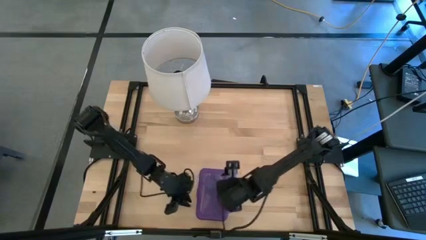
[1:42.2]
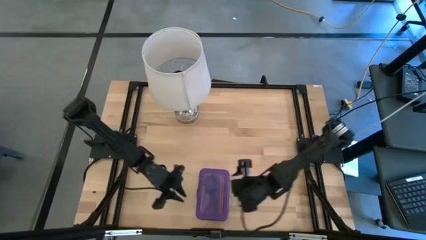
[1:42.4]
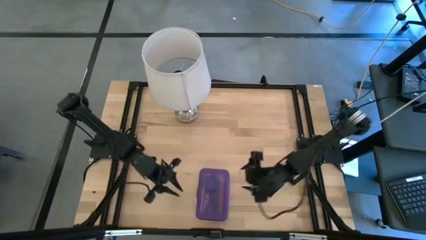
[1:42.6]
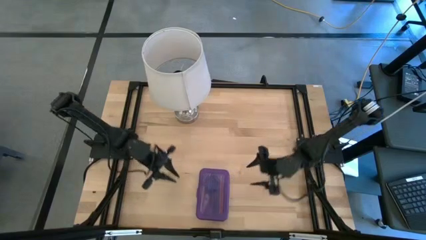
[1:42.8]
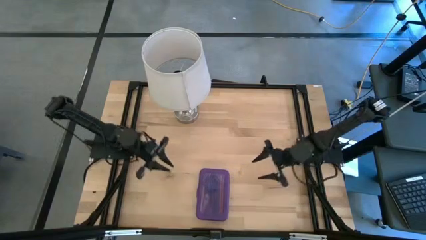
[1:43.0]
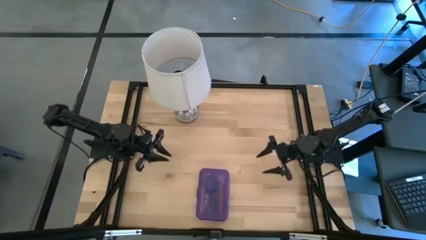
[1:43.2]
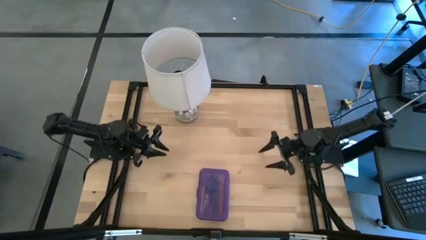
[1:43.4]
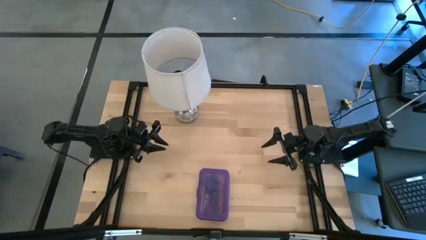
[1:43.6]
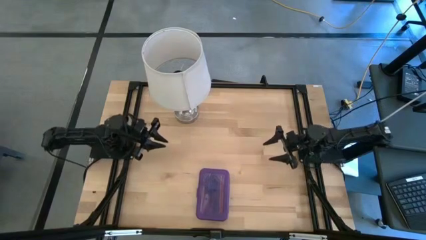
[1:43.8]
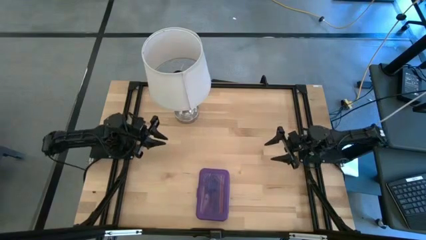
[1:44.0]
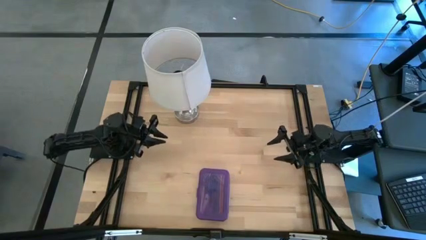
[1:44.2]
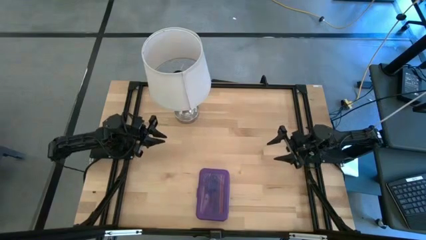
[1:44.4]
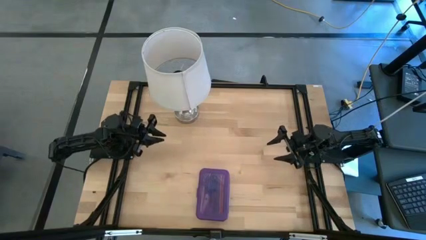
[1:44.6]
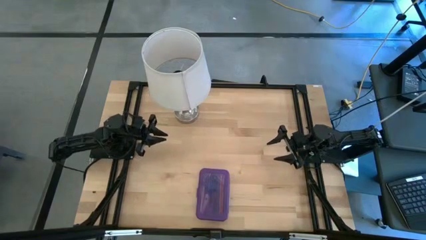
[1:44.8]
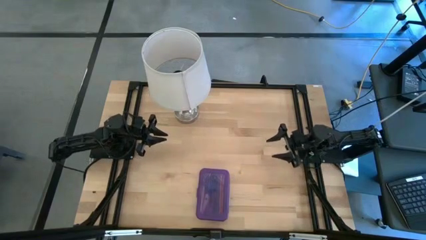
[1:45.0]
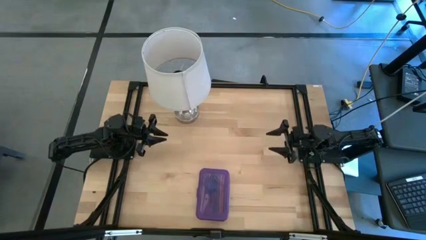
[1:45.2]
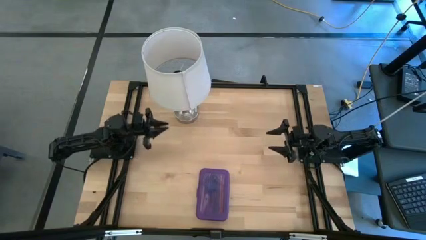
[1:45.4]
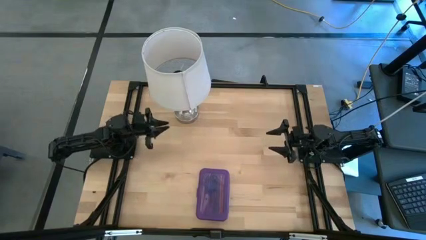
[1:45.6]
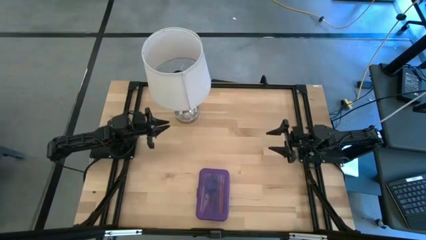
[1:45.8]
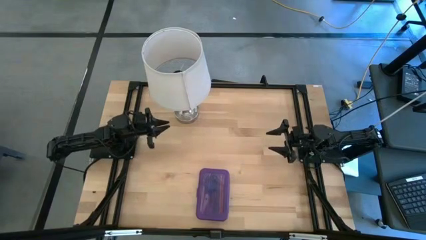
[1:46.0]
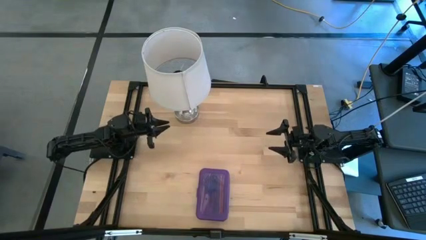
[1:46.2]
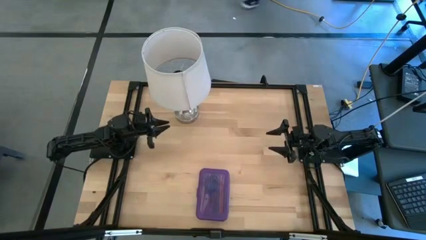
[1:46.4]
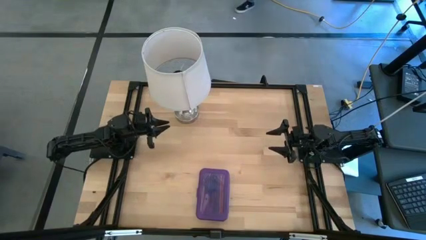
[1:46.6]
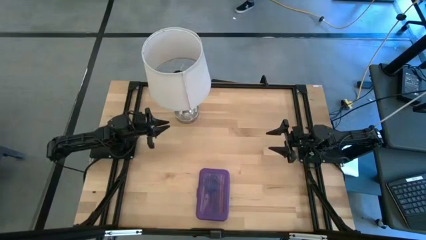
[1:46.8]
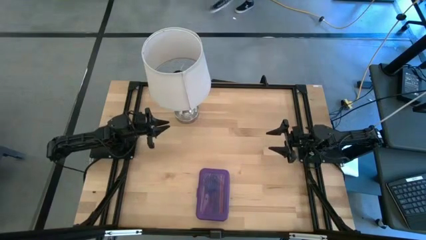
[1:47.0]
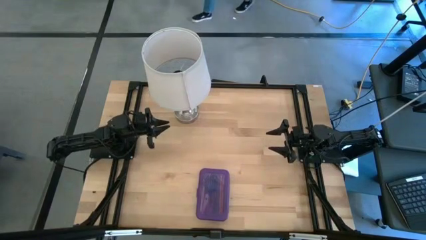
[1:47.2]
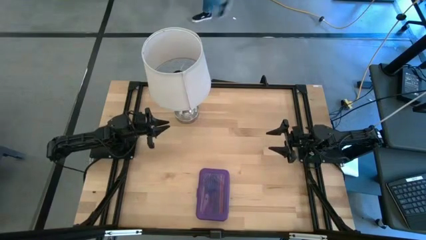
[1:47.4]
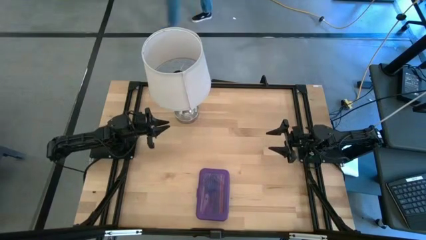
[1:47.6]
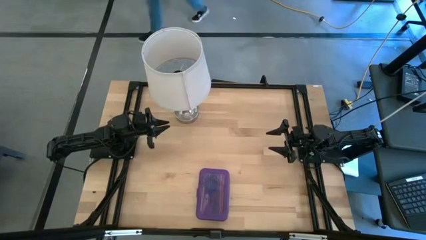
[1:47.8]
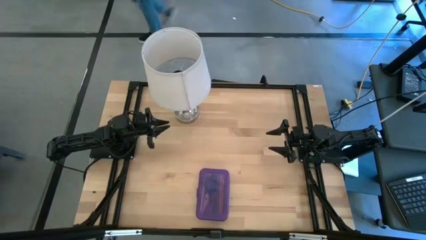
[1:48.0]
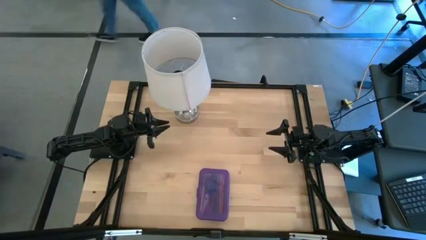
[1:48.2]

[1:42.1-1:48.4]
Task: Pick & place school supplies into a supply box
Return to Home Position

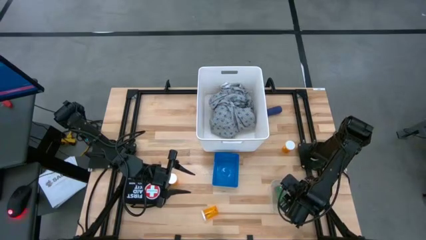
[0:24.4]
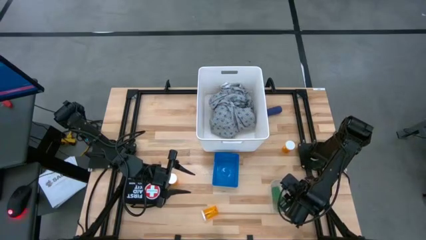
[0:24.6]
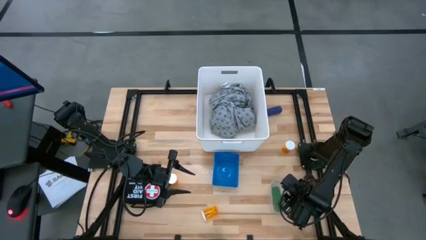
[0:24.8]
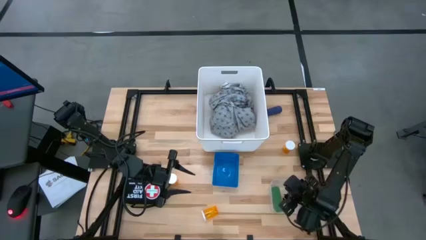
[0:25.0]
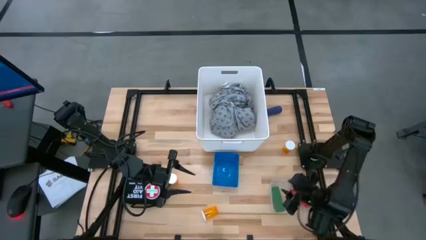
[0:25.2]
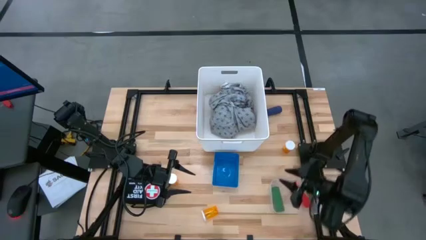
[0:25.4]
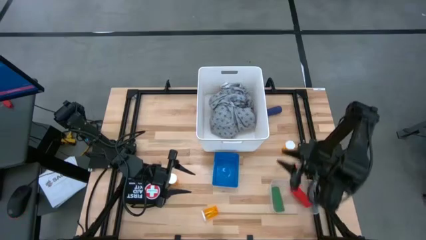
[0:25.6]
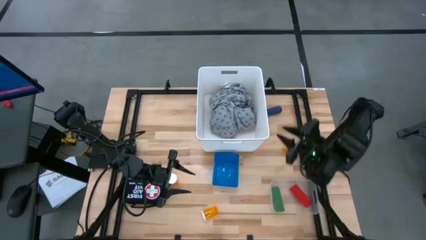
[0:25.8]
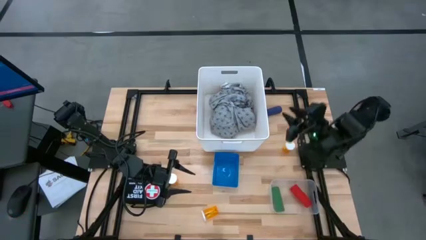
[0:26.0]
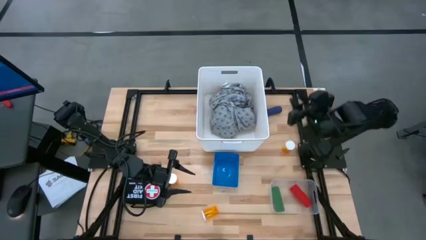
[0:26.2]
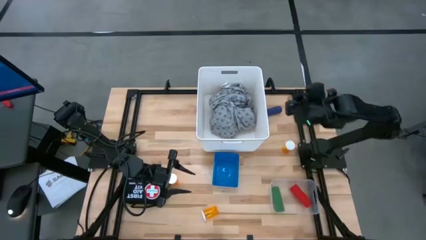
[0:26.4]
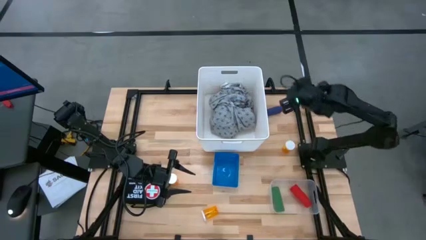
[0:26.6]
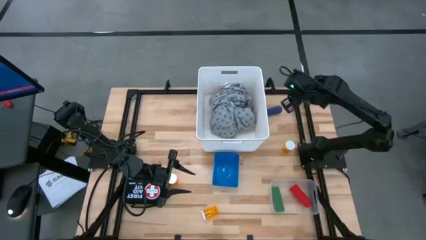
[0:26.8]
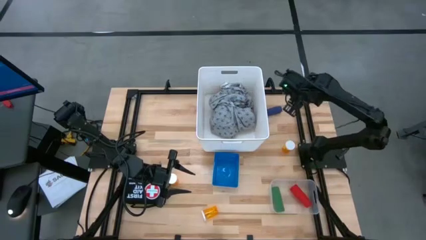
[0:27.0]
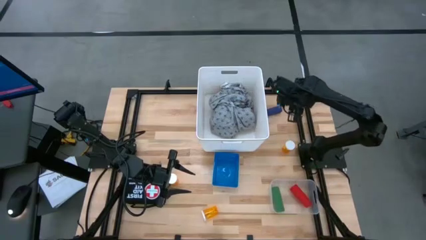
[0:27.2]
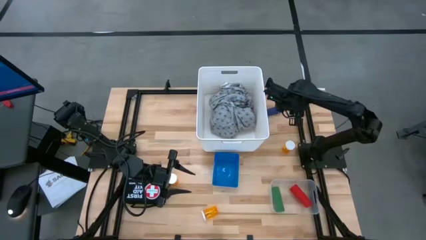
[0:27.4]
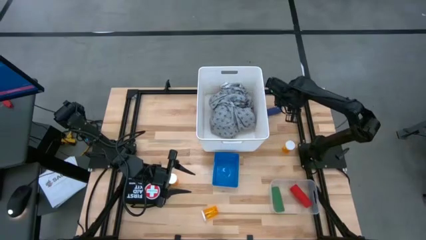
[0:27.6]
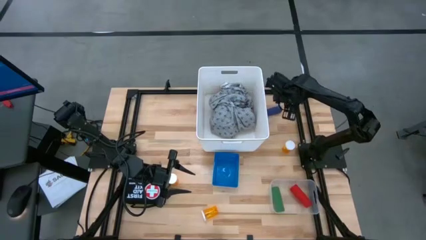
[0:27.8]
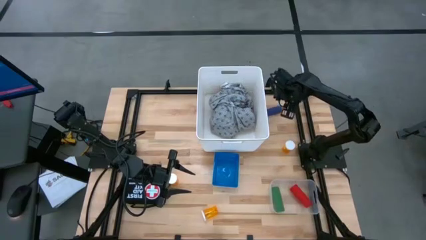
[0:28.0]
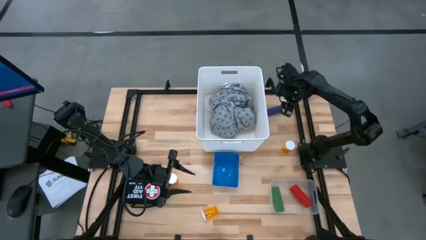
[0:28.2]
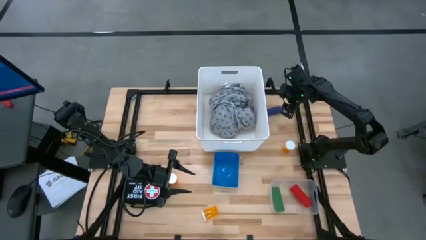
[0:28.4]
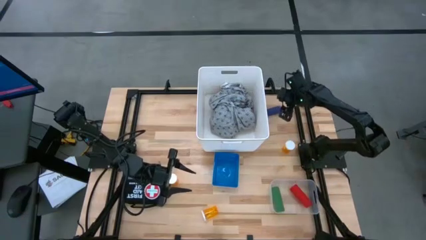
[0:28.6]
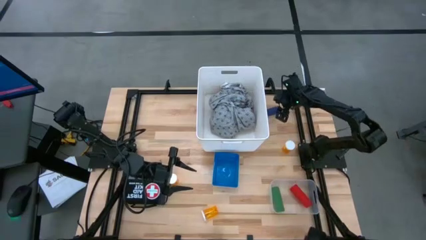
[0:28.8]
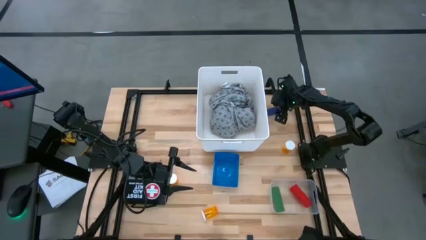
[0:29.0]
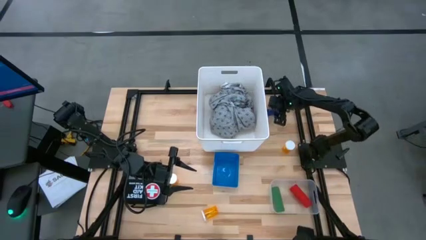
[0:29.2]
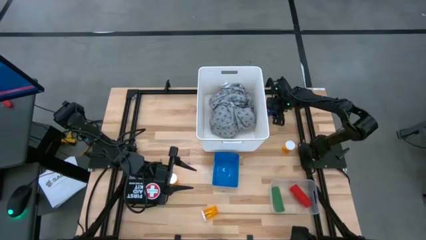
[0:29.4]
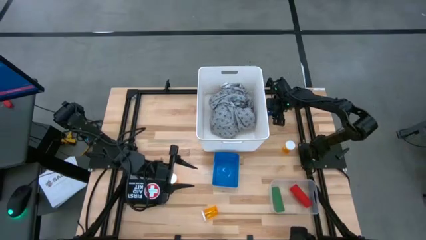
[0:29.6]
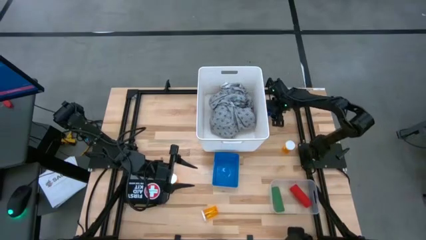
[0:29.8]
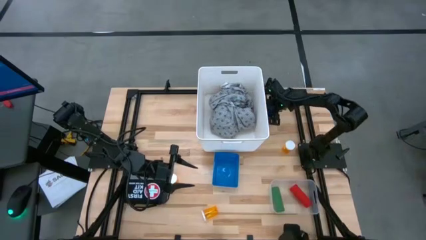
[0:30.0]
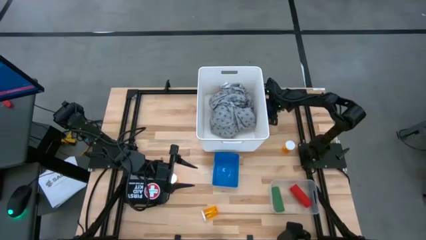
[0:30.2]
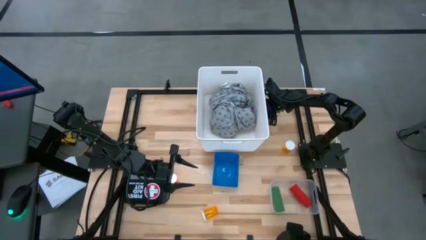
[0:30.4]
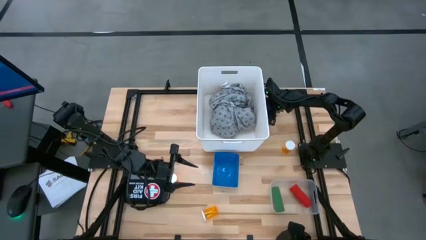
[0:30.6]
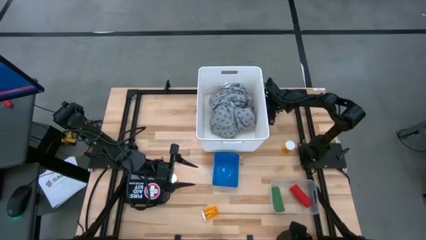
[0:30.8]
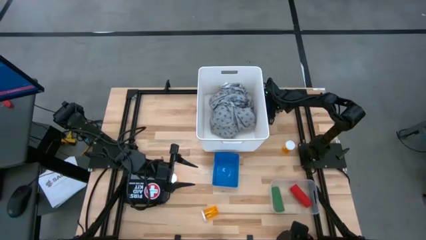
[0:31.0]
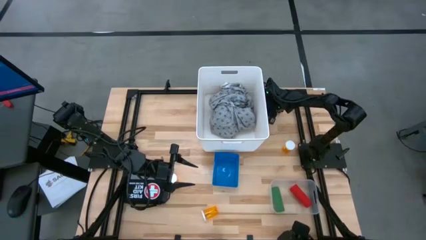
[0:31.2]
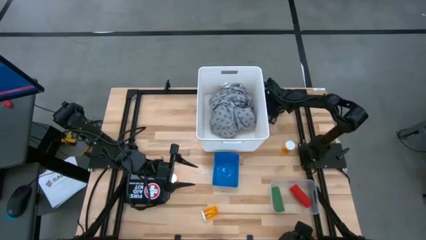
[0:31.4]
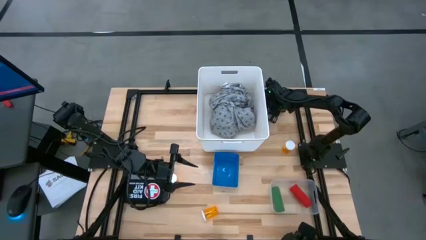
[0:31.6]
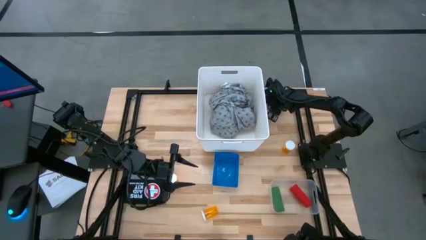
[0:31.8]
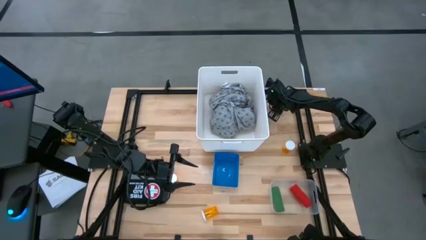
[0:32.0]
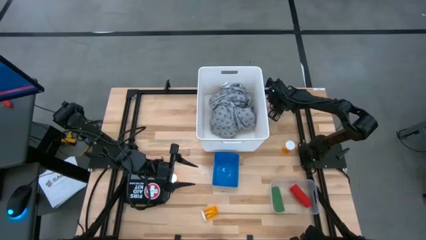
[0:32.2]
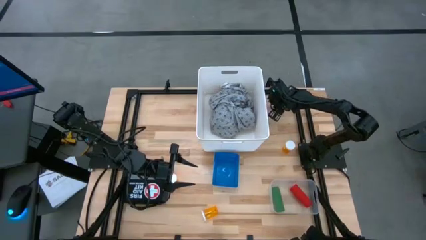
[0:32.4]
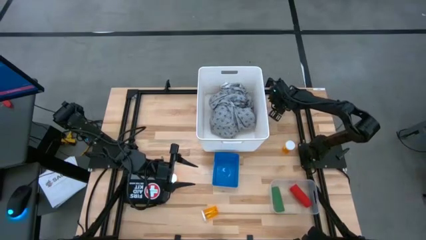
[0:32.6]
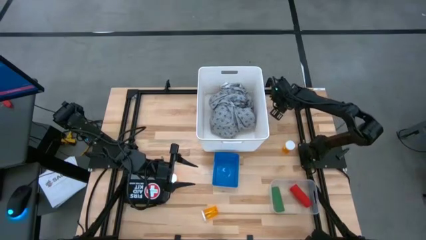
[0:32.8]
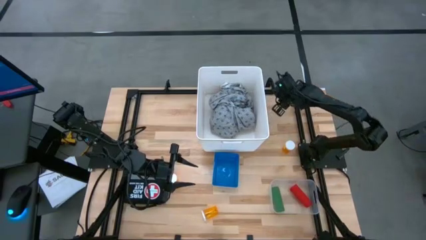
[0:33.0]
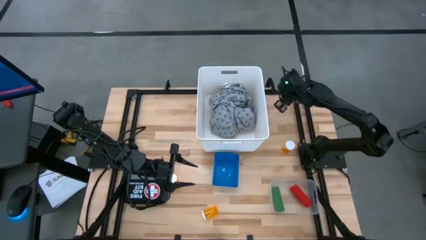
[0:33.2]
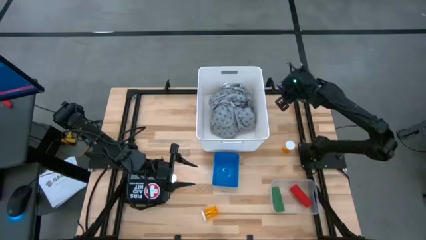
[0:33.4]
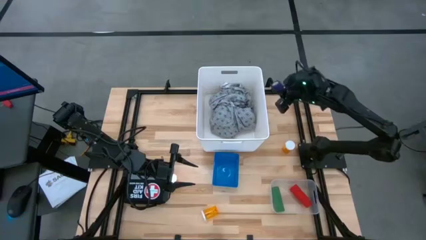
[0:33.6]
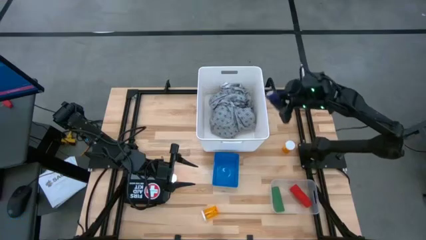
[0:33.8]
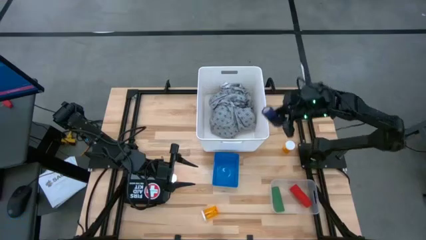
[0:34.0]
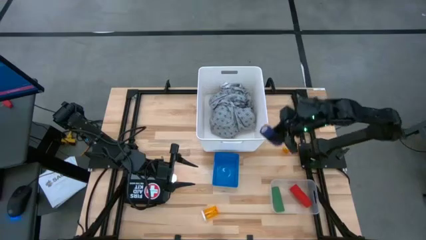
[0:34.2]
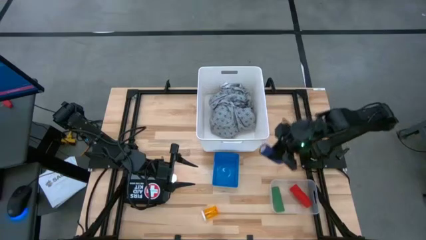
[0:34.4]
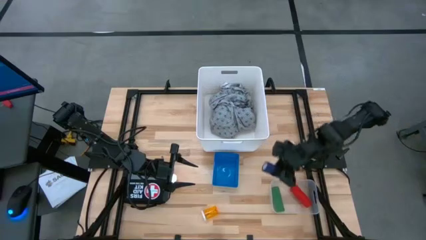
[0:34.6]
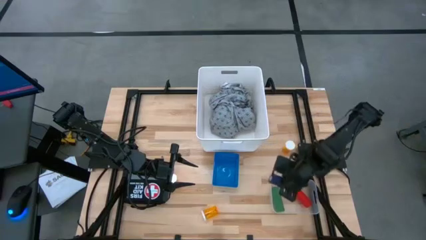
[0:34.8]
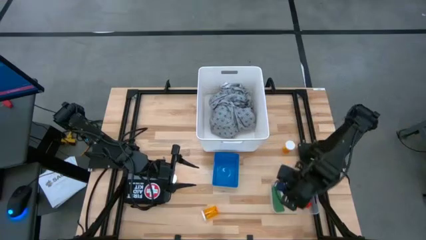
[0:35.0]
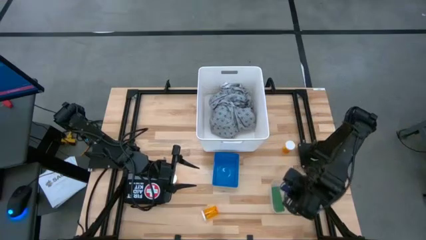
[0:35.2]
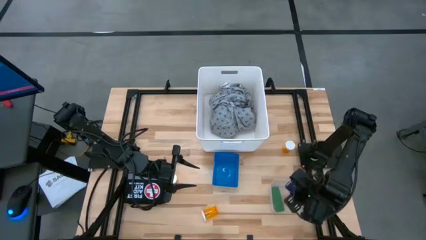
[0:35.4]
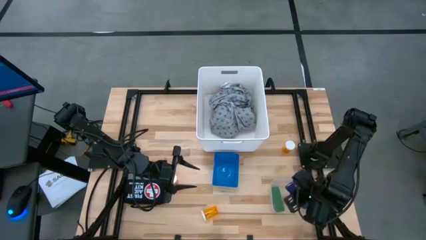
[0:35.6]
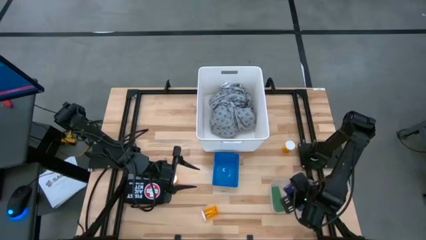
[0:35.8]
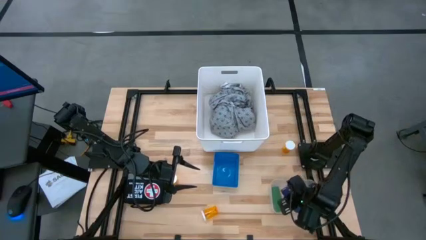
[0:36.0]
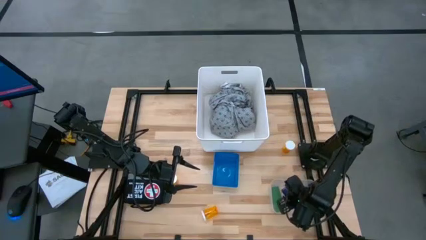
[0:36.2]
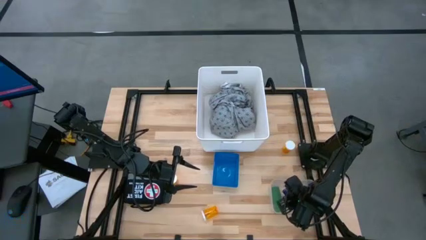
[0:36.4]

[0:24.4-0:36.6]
Task: Pick & place medical supplies in basket/bin
Put the blue bandage into the transparent bin
